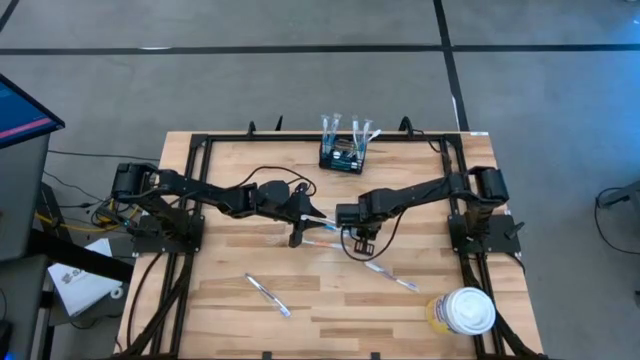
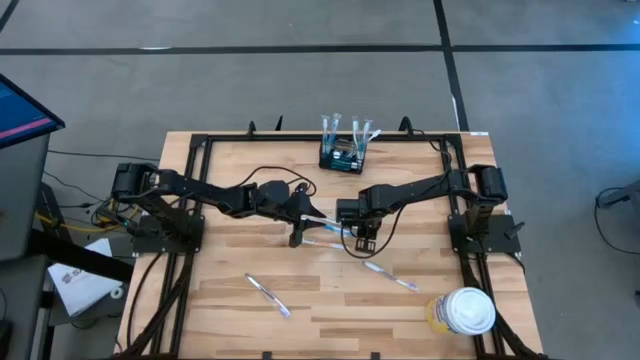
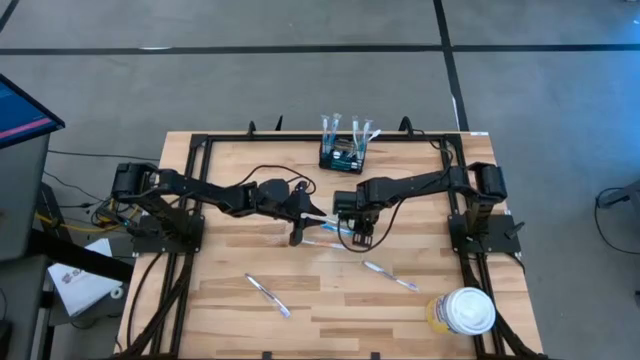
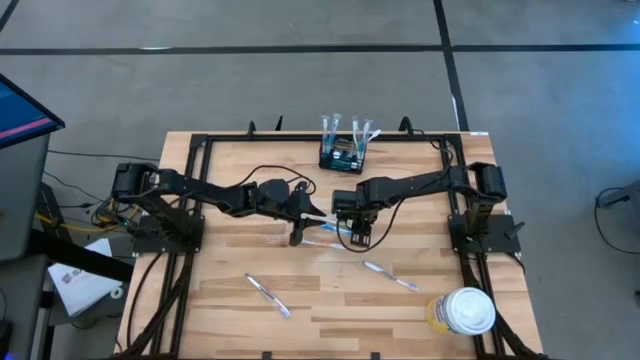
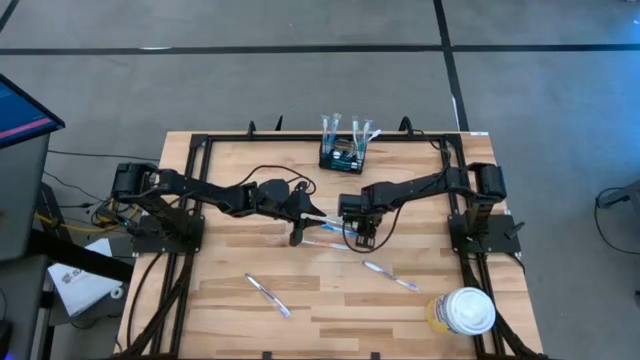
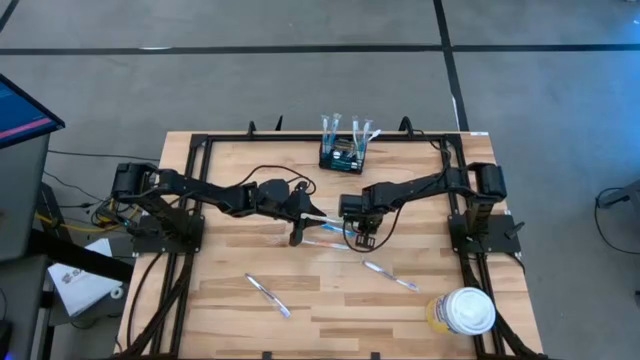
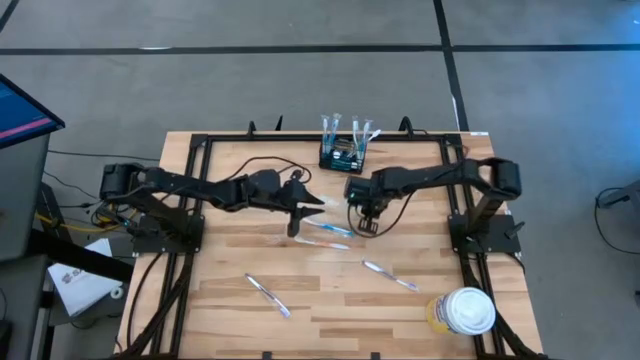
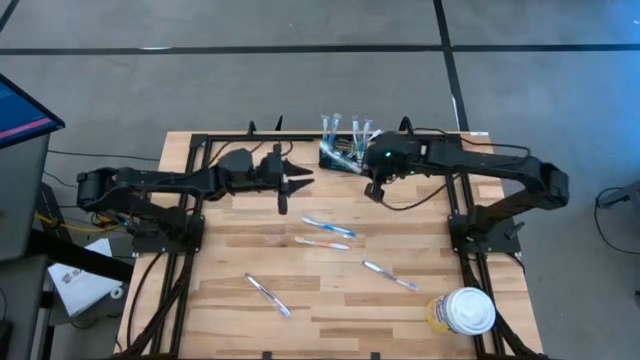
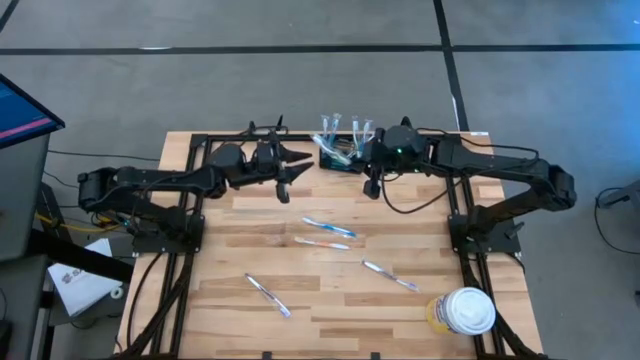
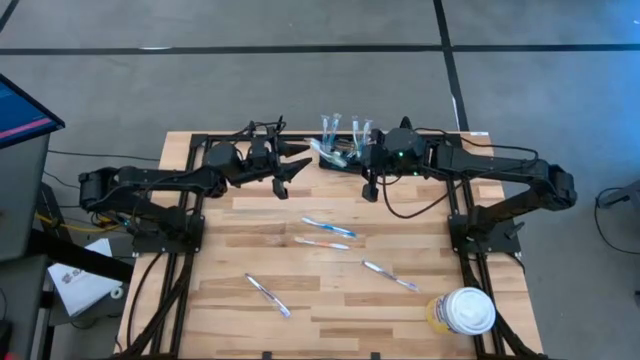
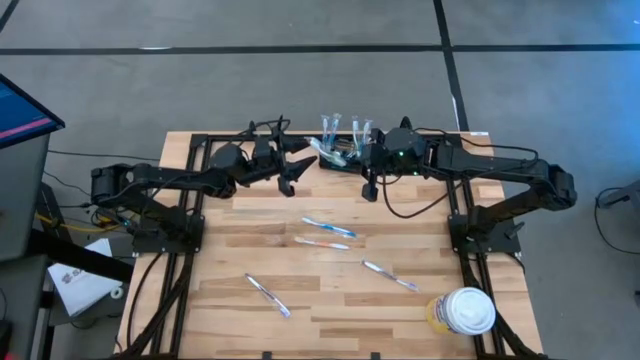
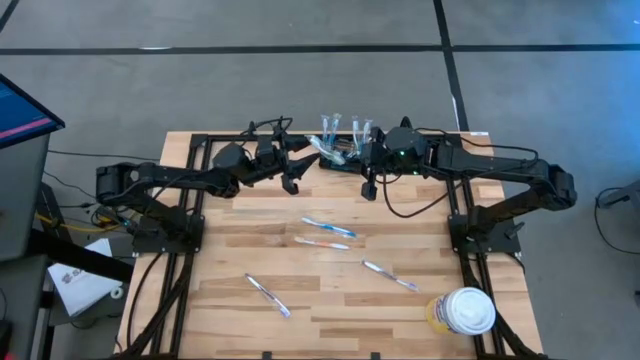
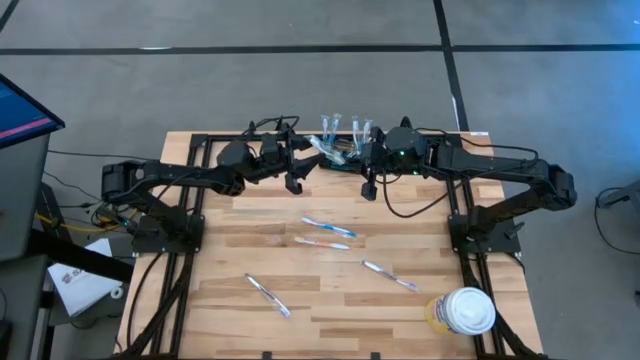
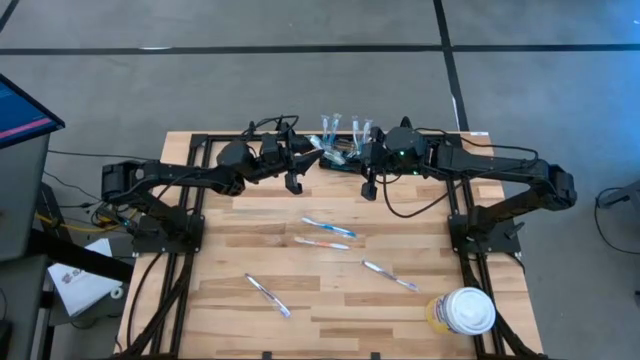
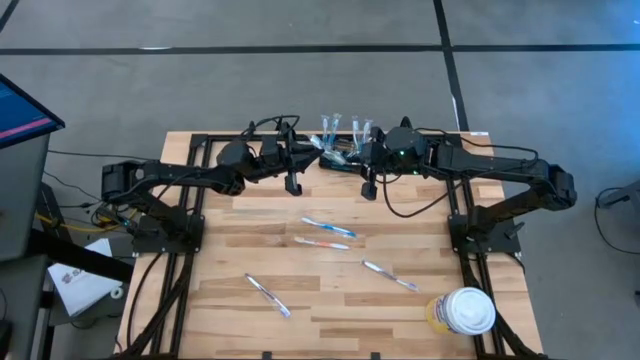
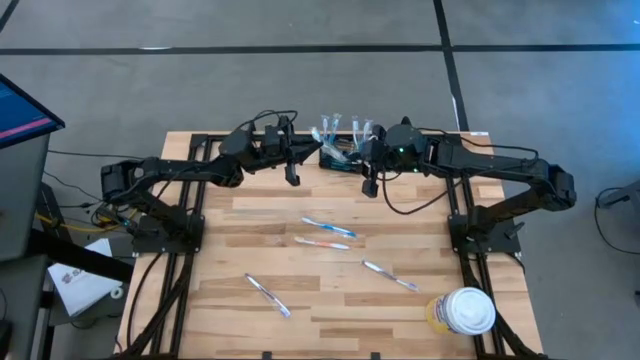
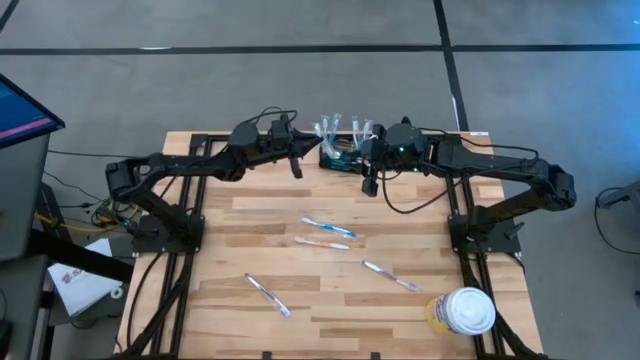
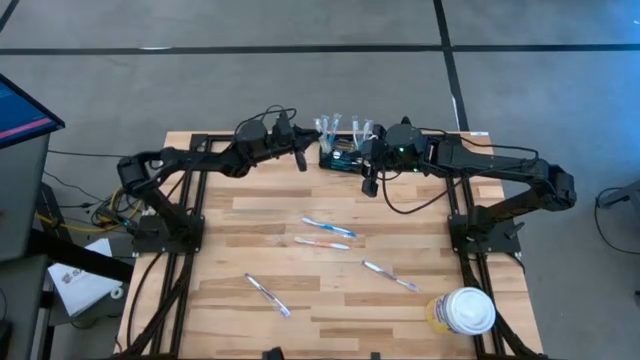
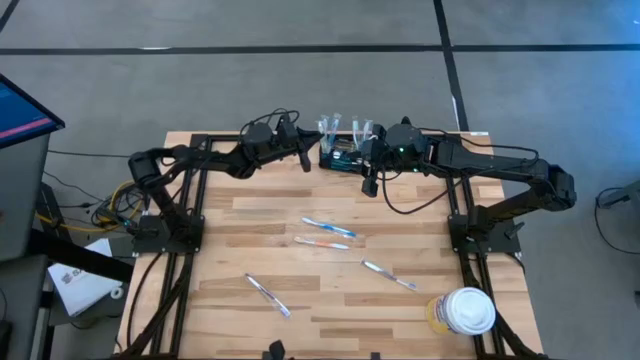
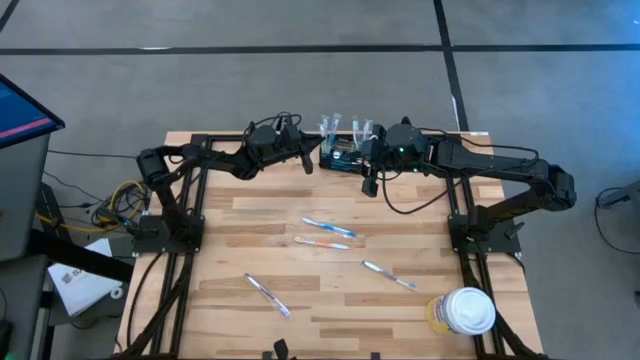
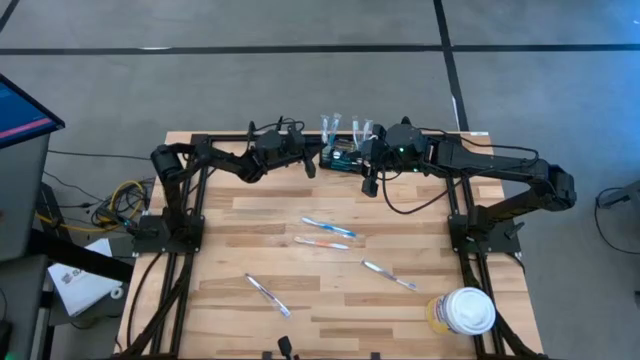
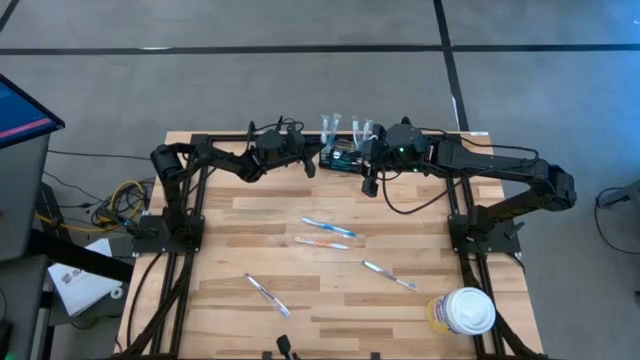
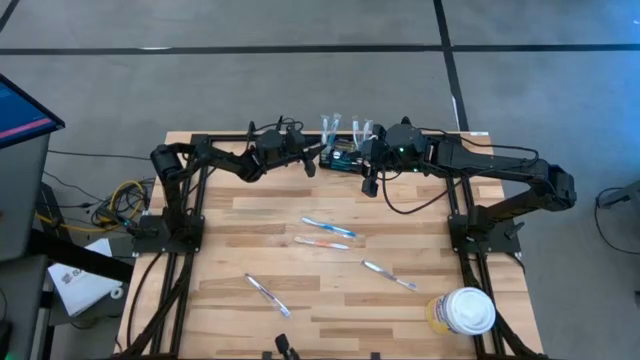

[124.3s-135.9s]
Task: Pick & Place toothbrushing station
Put the green toothbrush into the mesh organizer

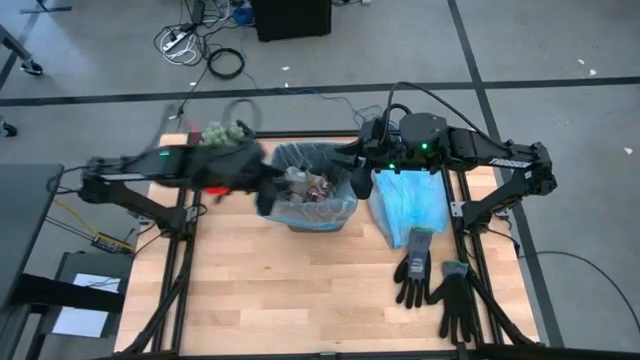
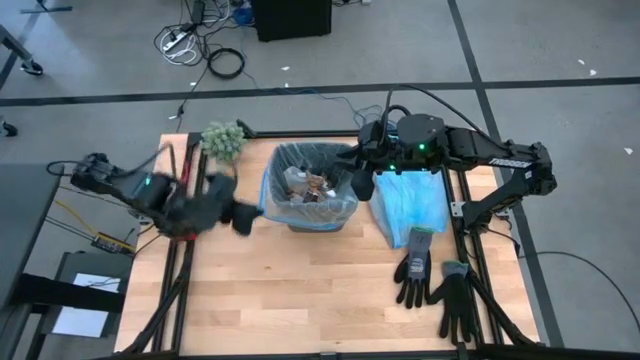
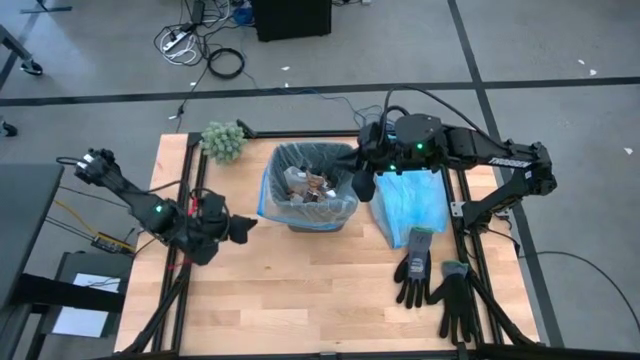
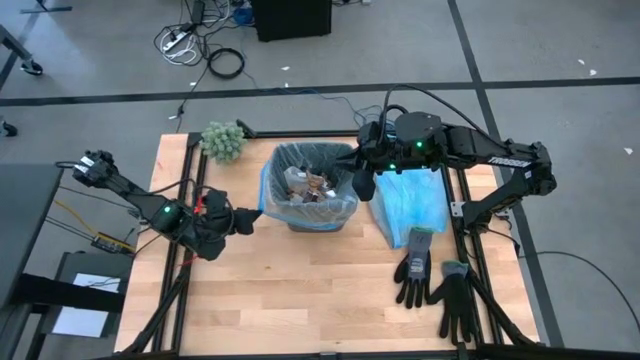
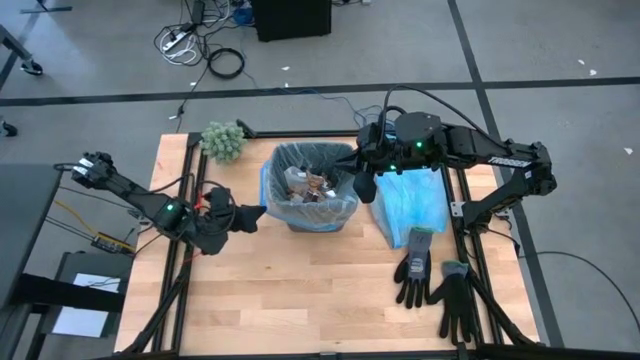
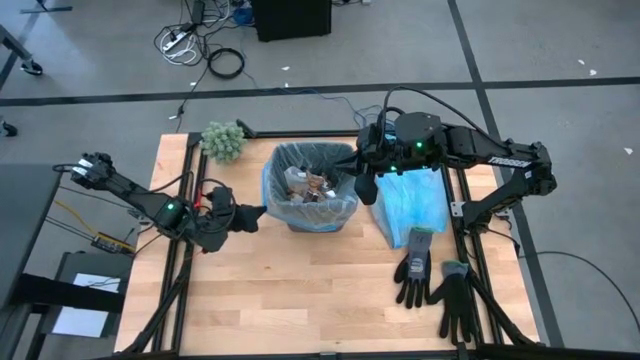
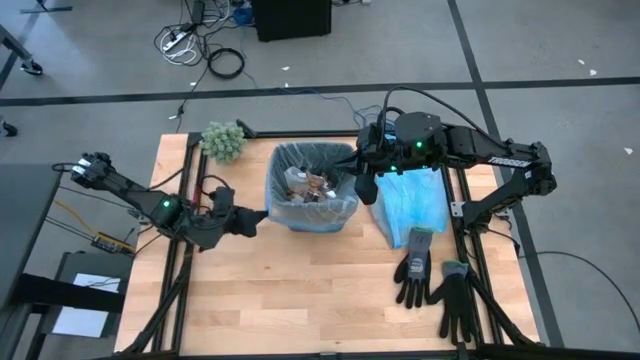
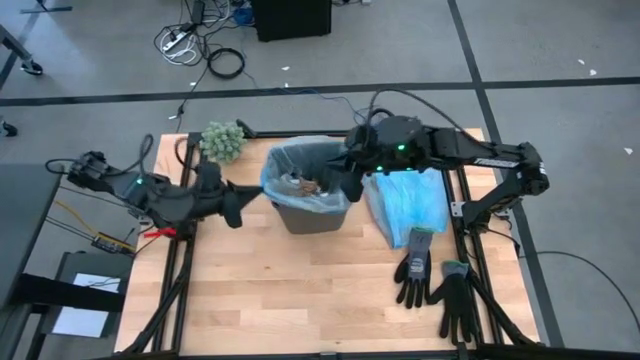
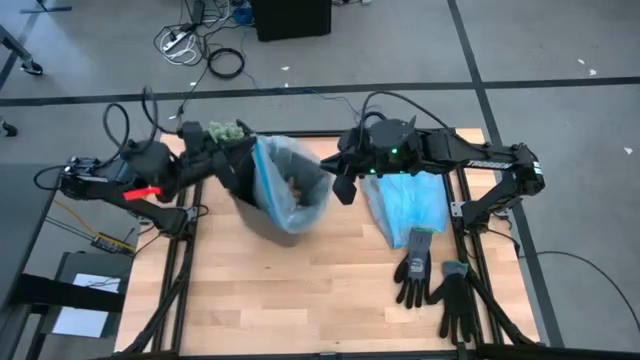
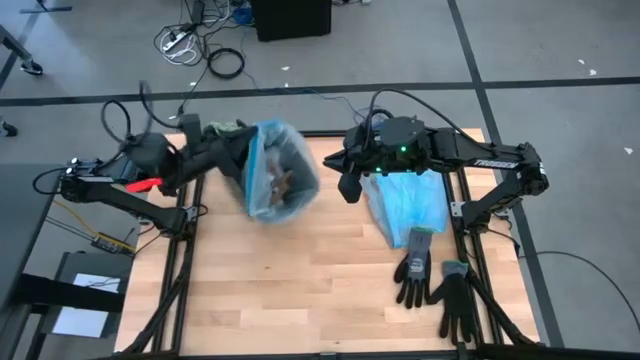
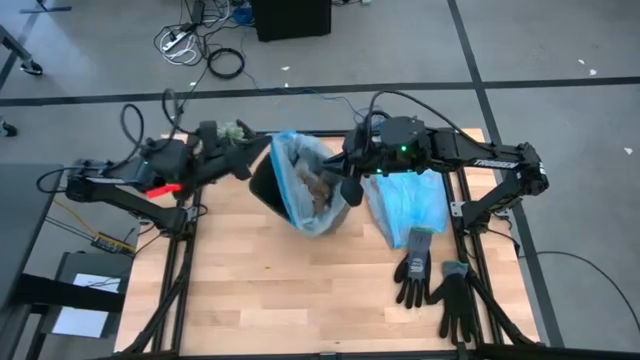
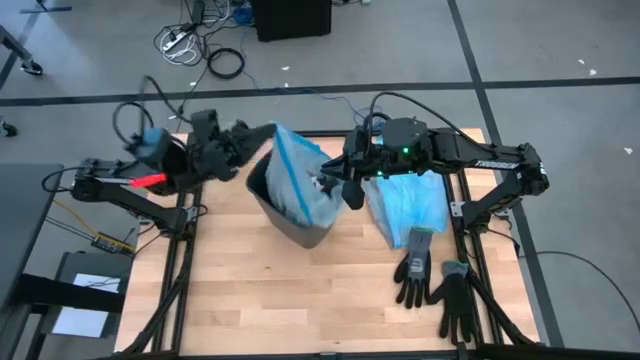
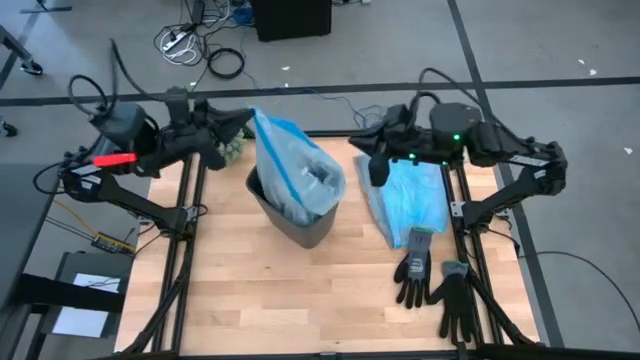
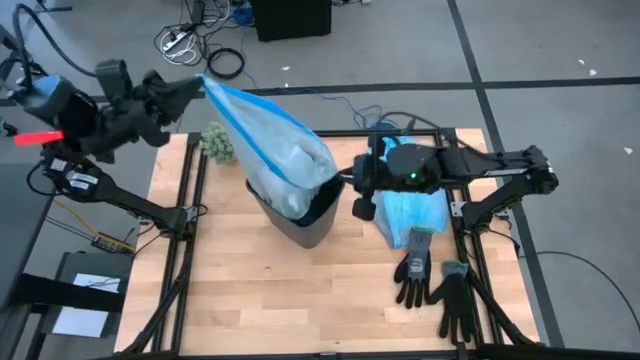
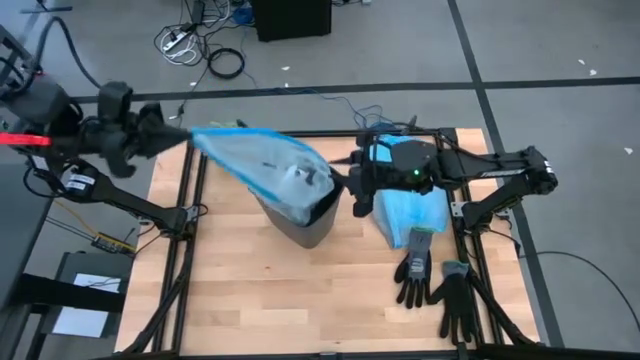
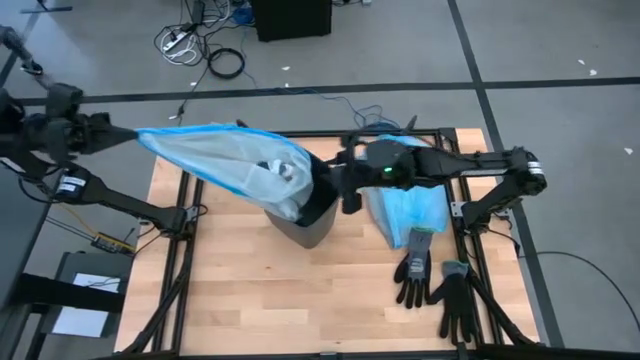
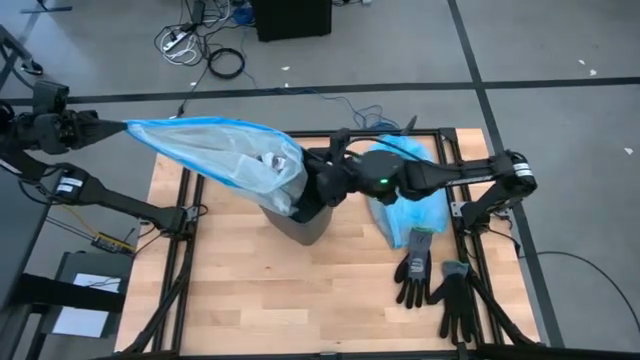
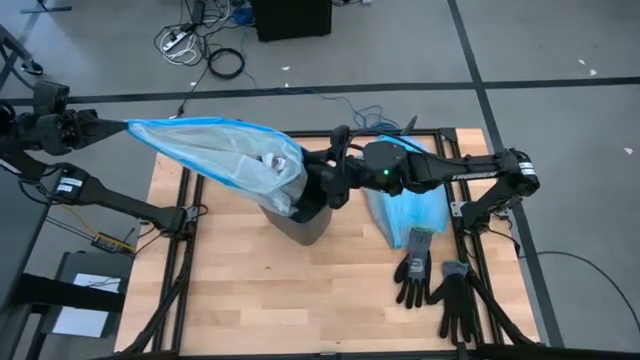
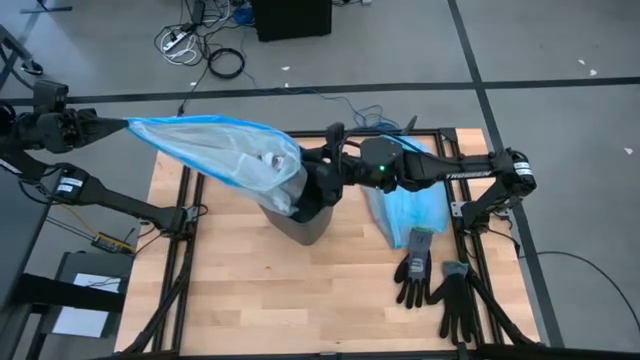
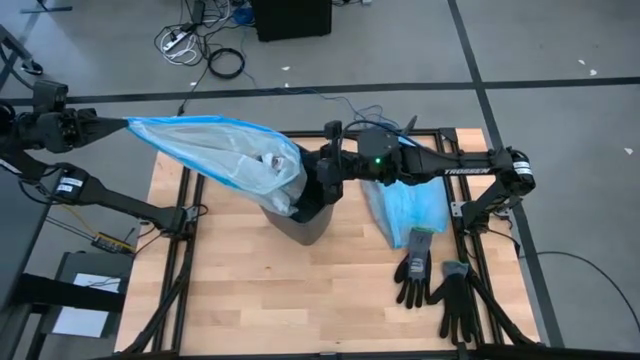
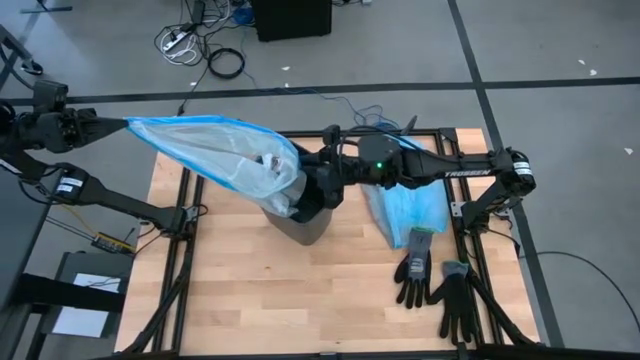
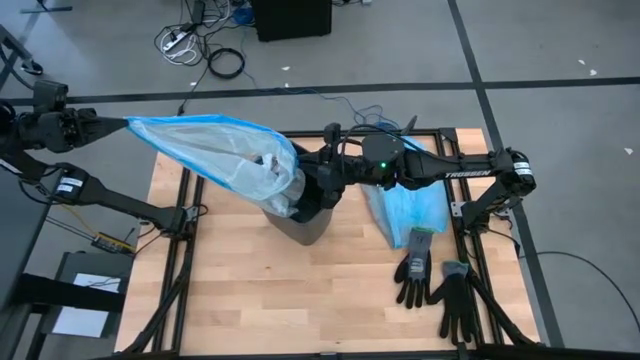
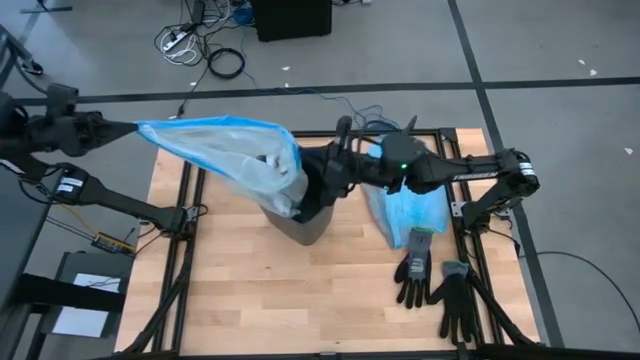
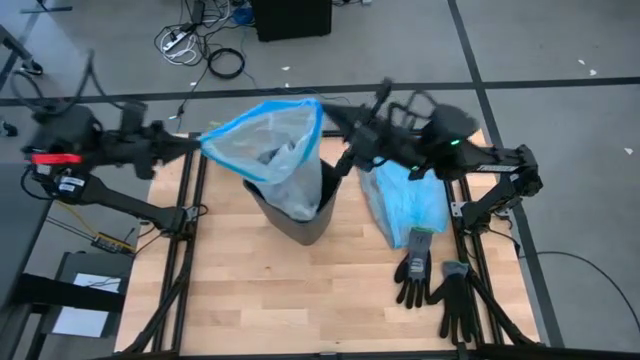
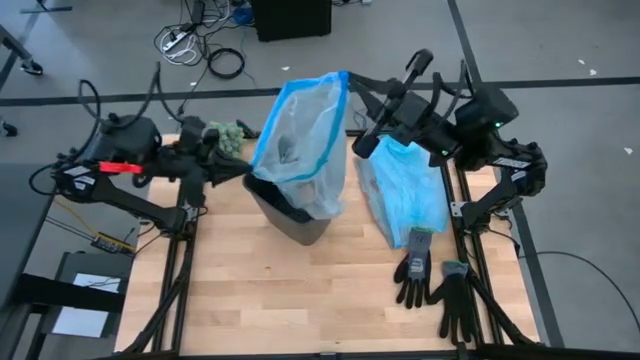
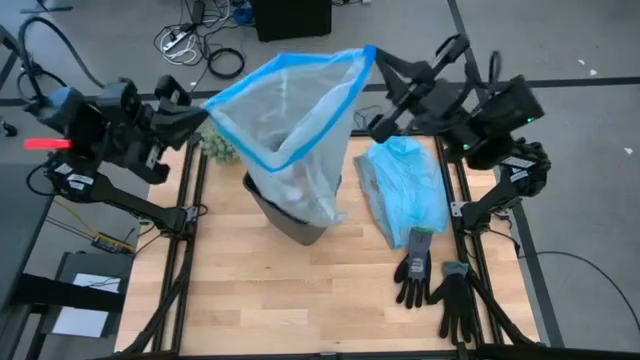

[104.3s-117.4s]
Task: place trash/remove bag and relplace
Remove the trash bag from the bin
